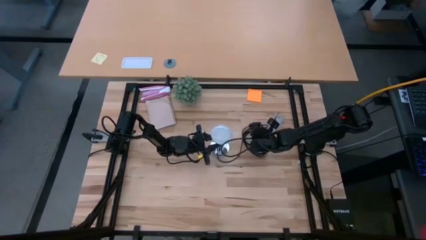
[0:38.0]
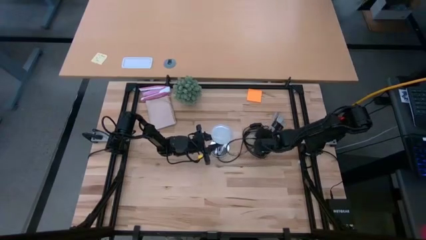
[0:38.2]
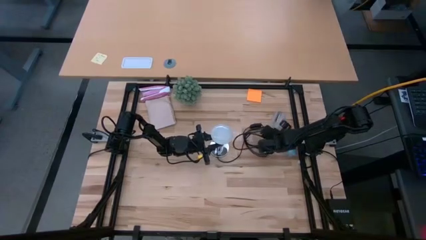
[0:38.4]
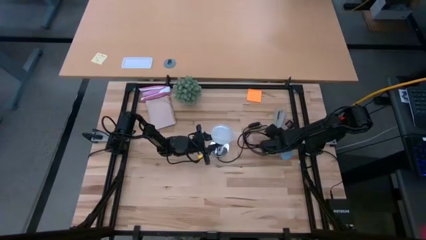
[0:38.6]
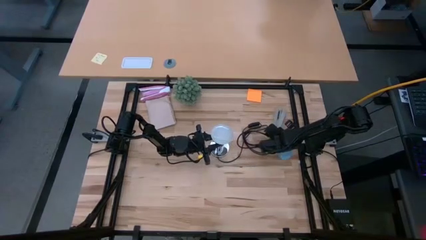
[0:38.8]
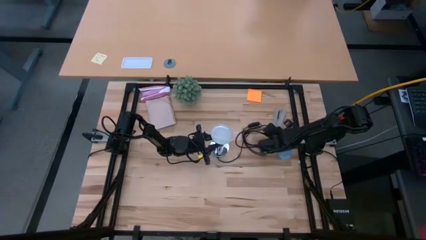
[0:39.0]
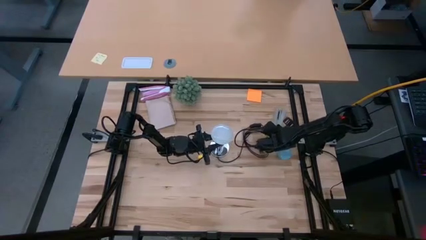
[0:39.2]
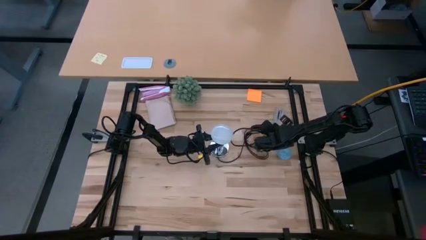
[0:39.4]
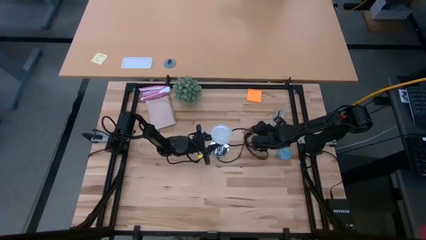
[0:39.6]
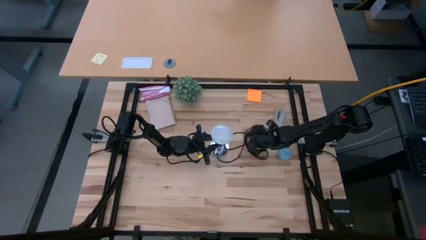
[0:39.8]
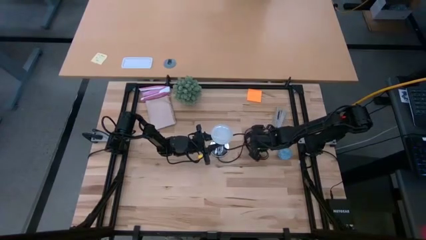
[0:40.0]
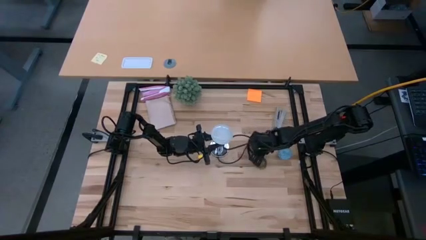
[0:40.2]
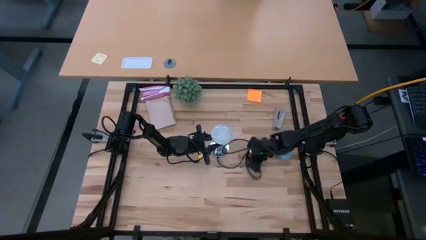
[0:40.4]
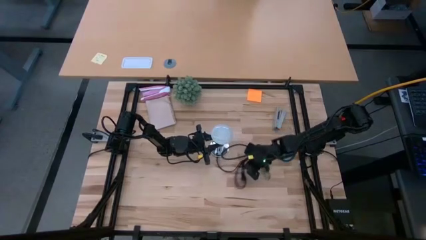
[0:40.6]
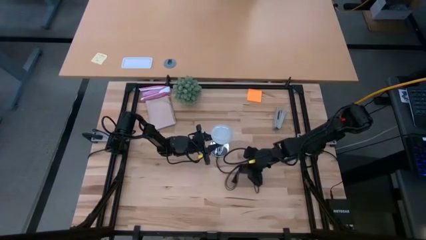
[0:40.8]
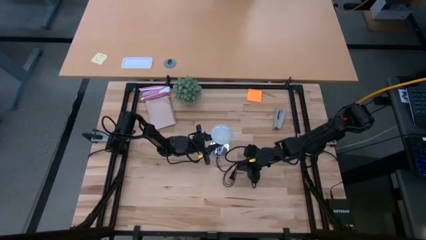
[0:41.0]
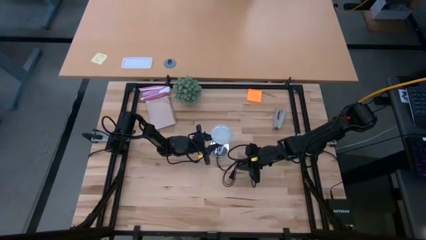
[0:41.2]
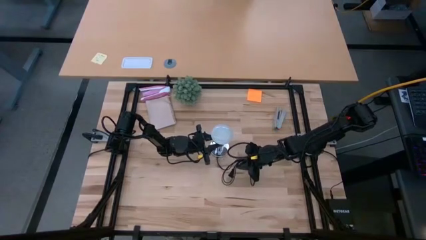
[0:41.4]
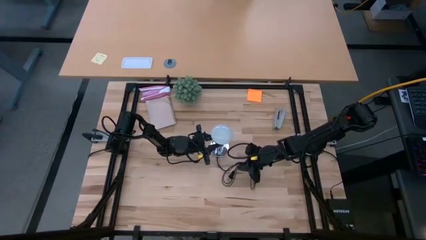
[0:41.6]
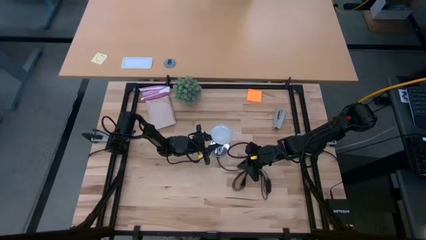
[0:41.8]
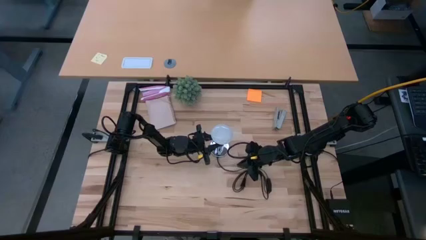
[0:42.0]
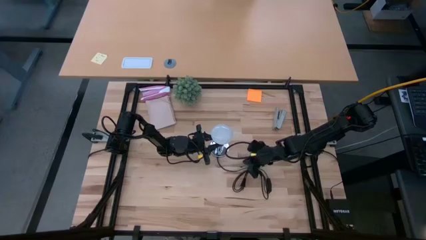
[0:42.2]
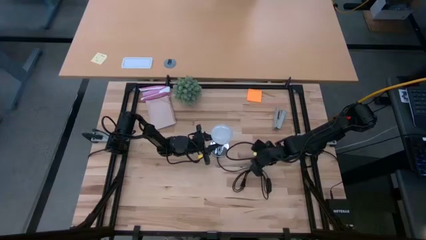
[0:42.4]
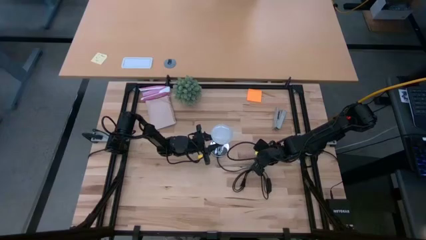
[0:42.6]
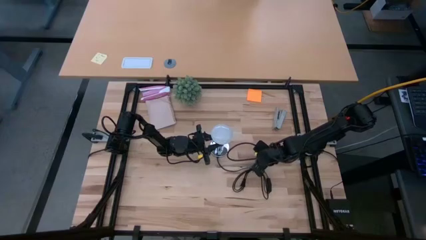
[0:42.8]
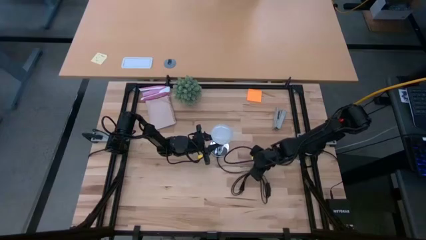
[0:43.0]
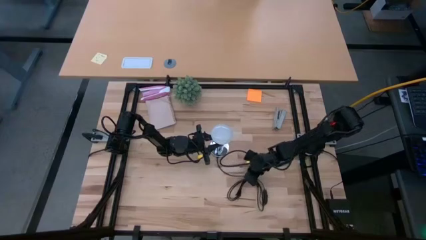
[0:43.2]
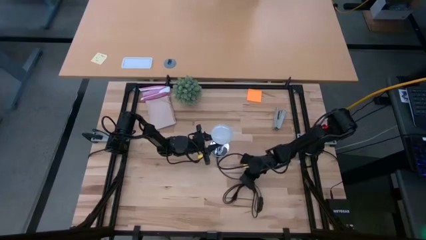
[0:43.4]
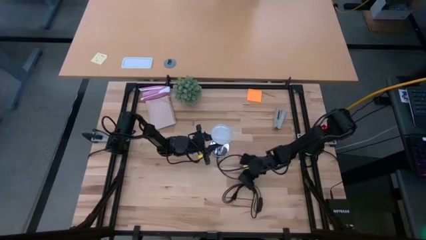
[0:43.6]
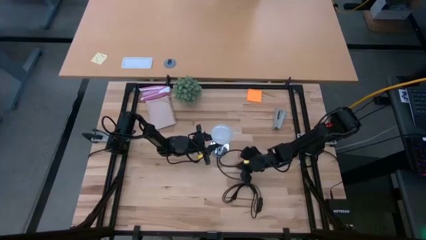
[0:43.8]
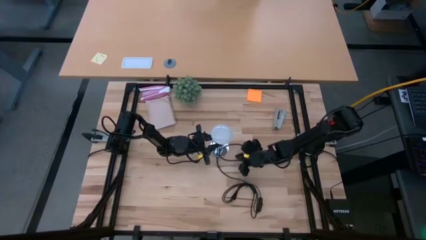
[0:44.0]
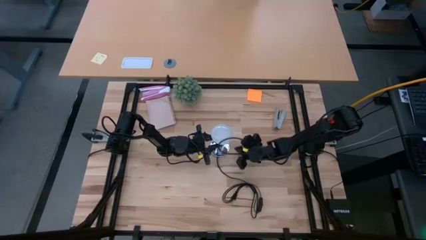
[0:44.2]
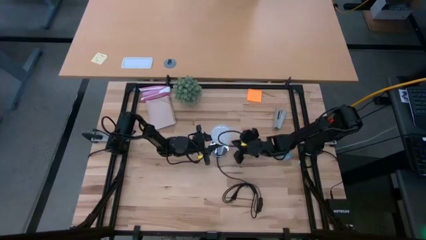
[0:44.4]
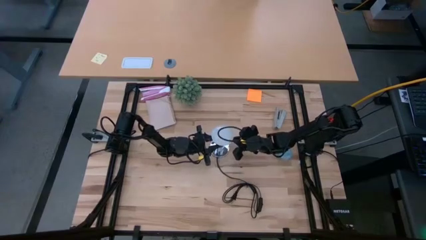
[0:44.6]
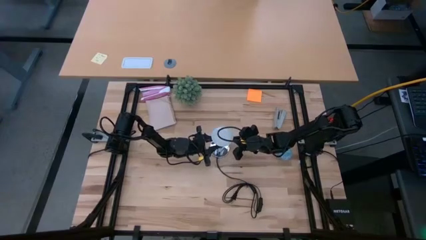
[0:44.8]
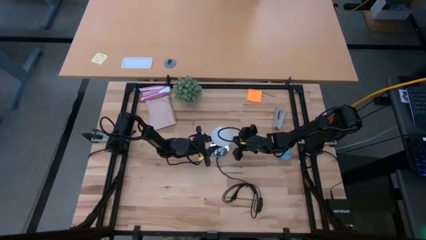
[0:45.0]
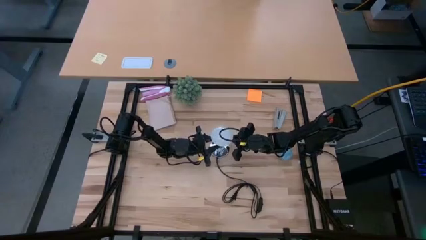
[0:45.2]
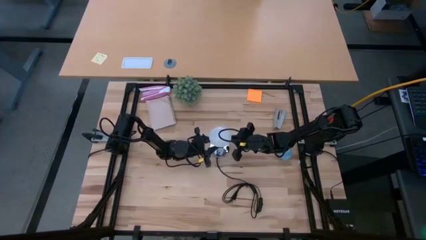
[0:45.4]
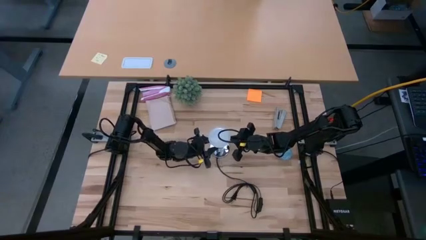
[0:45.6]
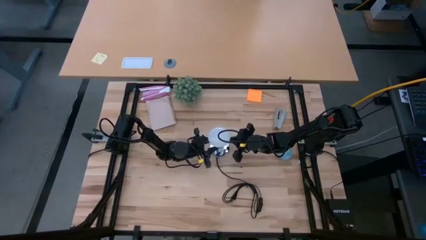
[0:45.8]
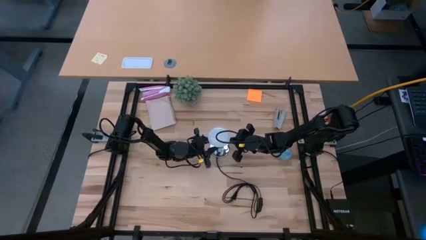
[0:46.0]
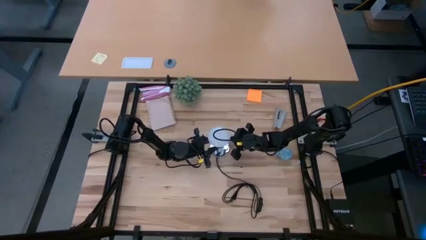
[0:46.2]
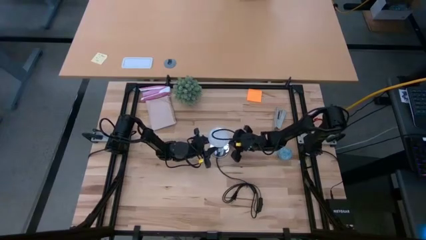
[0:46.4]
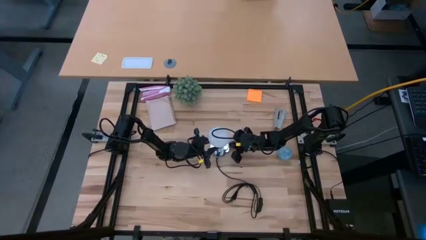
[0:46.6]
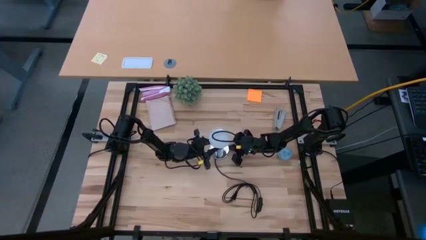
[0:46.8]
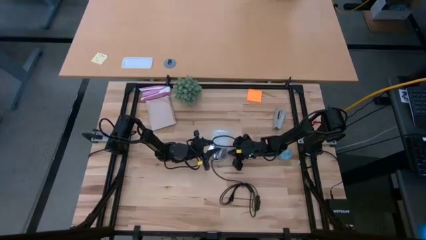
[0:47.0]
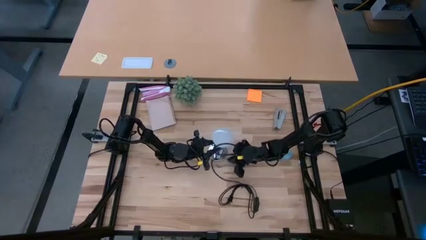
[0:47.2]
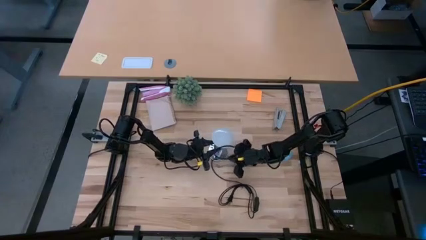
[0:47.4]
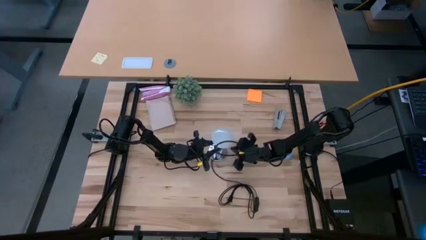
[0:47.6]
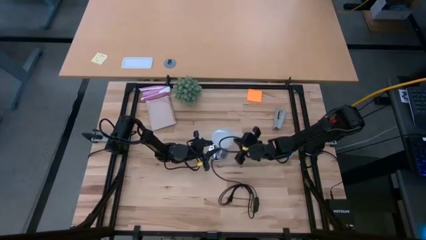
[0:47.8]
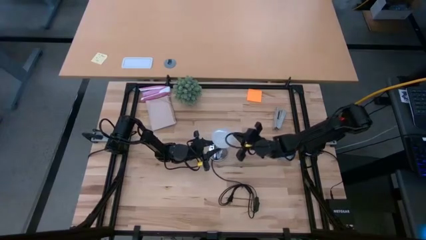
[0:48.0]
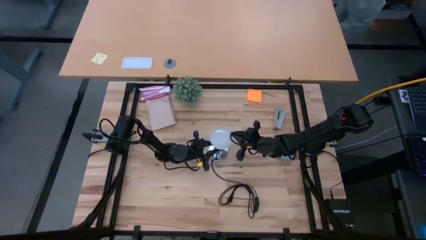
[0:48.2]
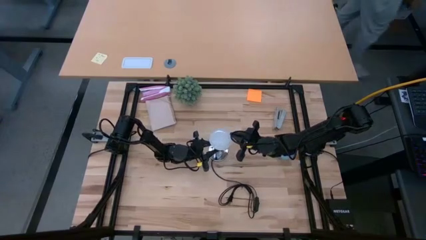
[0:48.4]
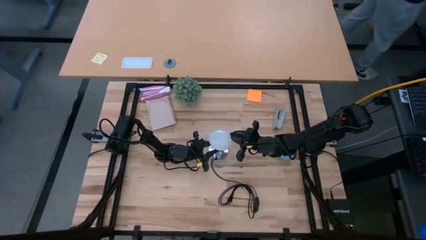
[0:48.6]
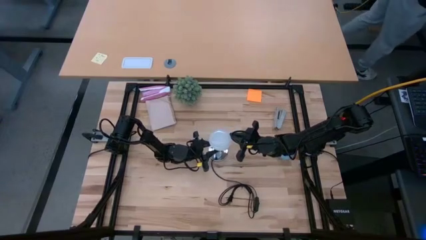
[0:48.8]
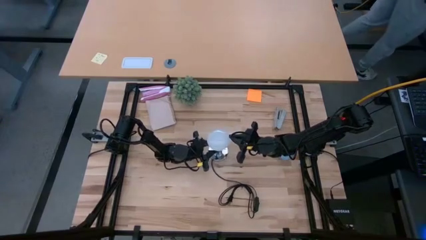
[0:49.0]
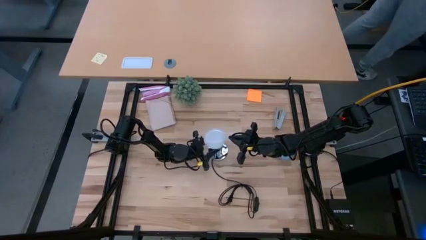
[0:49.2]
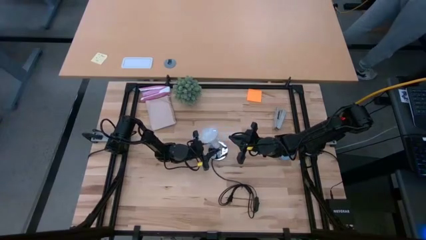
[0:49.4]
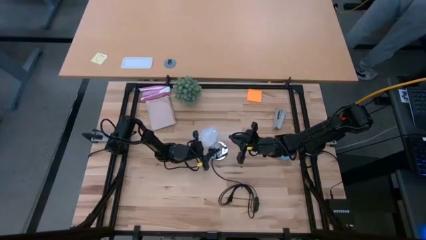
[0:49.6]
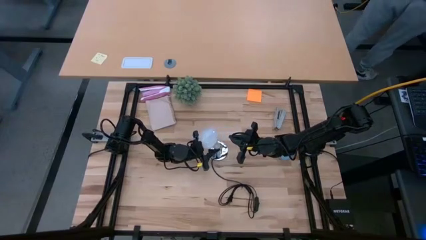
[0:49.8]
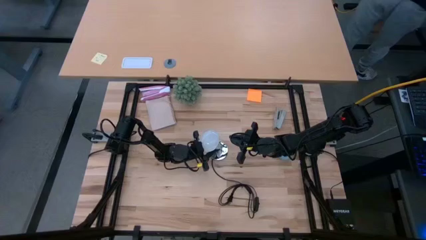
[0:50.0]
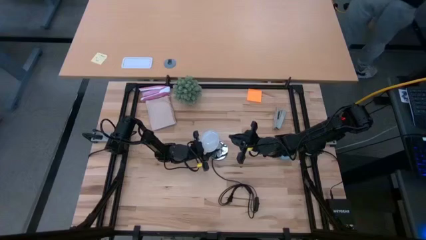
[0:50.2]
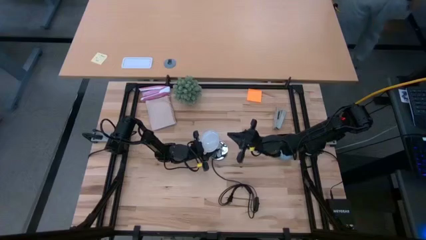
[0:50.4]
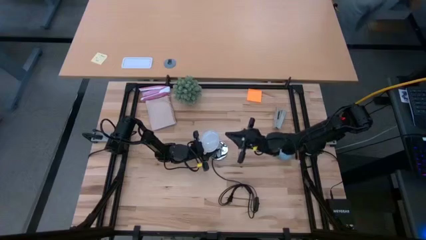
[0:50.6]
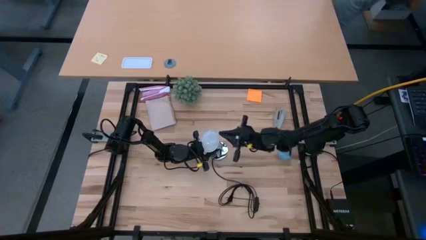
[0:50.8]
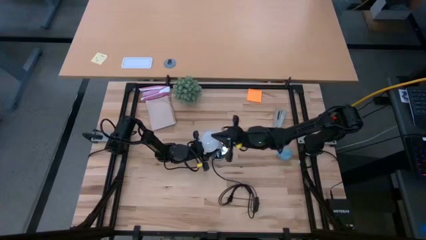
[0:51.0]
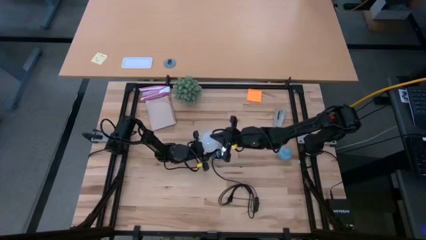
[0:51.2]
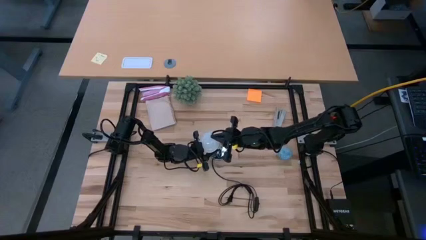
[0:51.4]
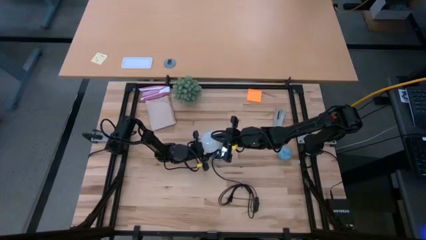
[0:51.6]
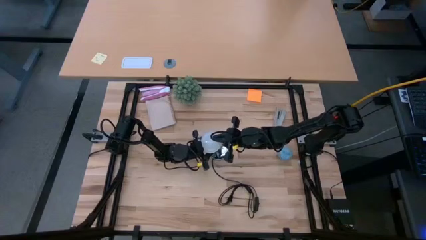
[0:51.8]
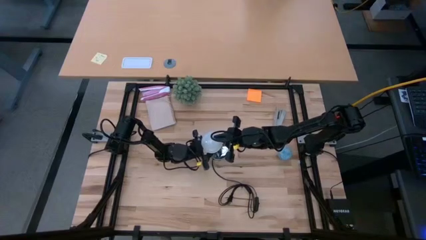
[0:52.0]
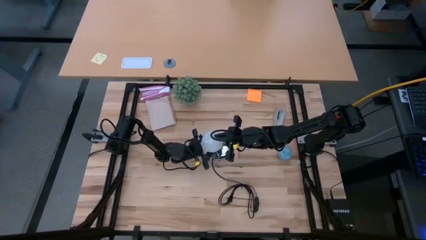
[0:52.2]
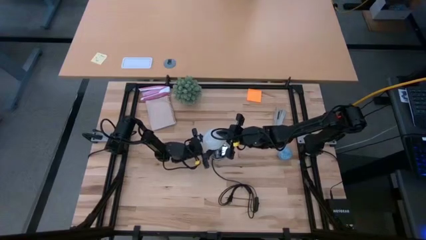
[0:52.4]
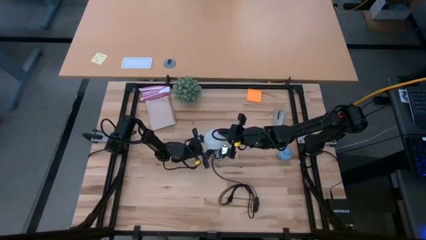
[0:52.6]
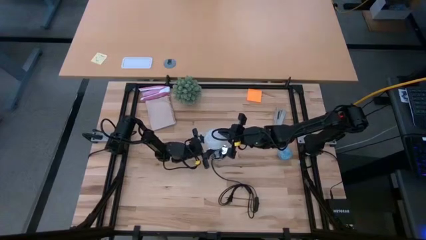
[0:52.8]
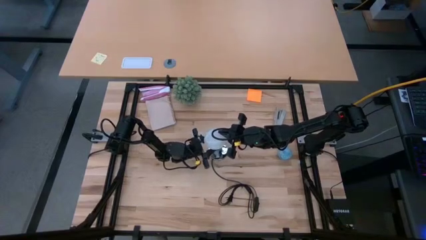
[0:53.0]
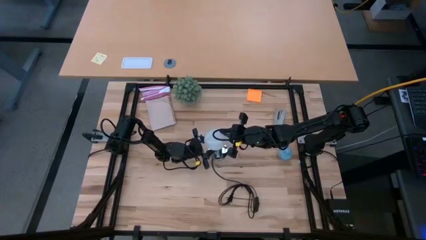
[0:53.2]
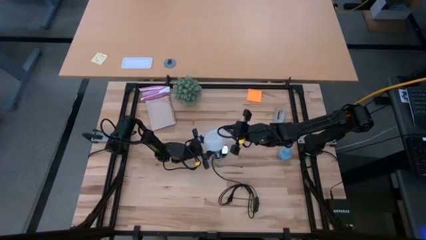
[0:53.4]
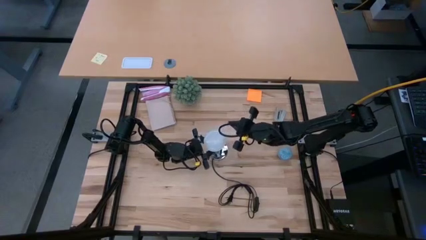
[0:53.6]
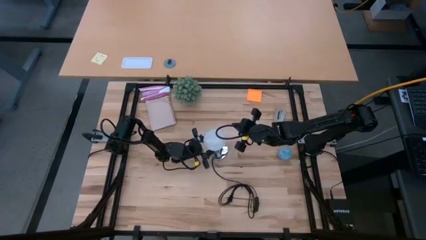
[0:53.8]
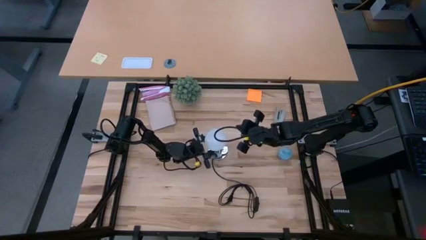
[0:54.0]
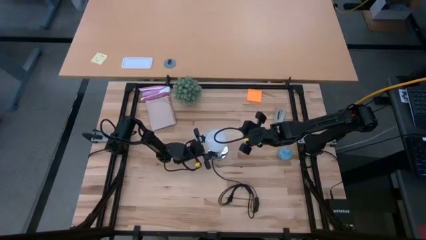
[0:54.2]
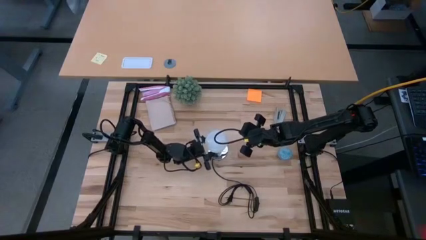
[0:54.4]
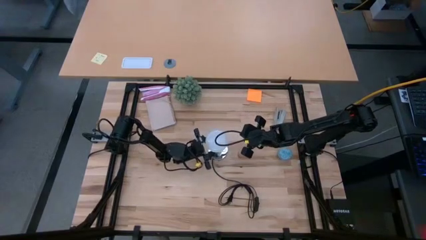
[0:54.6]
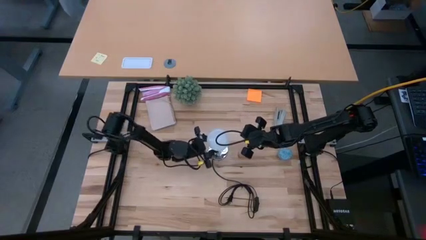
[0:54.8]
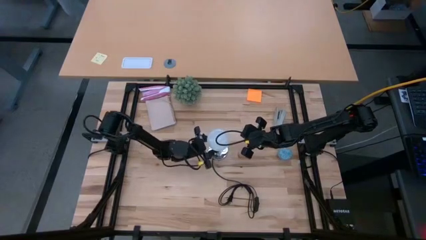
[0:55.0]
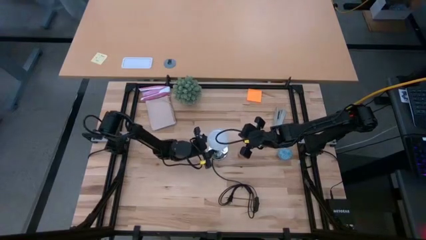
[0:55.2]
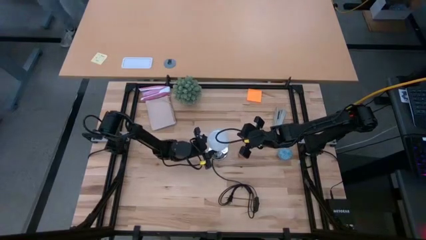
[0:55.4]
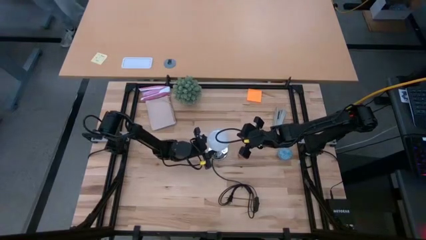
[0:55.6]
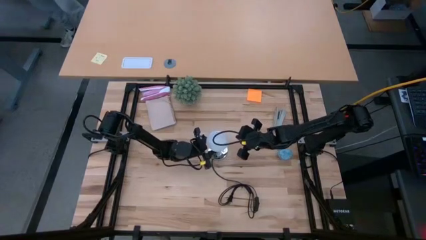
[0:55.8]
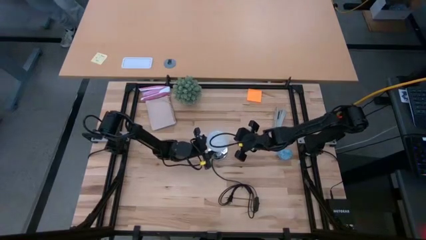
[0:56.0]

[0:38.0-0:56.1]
Task: Screw lightbulb
Insert the lightbulb into the lamp
